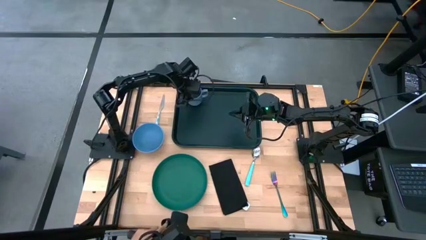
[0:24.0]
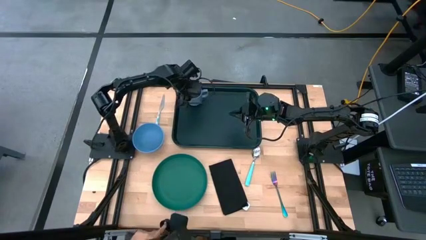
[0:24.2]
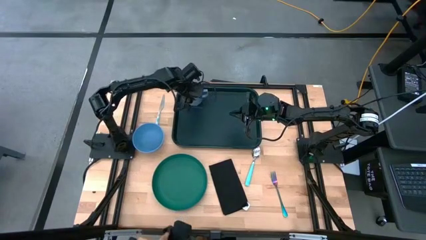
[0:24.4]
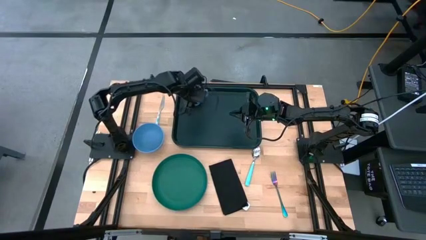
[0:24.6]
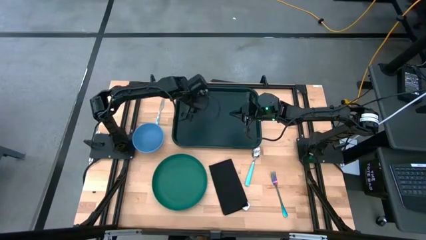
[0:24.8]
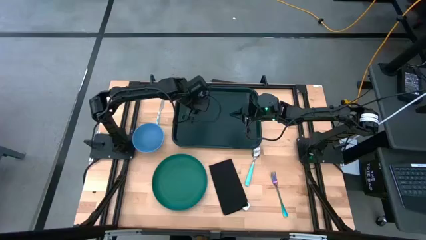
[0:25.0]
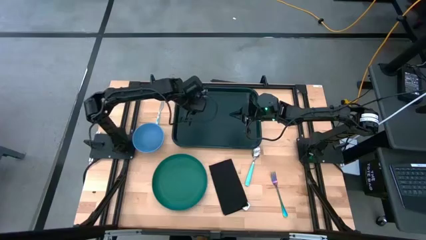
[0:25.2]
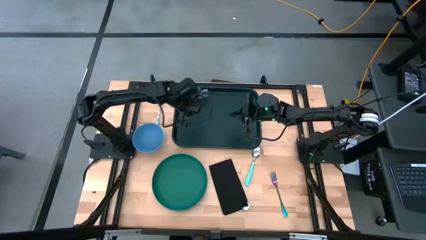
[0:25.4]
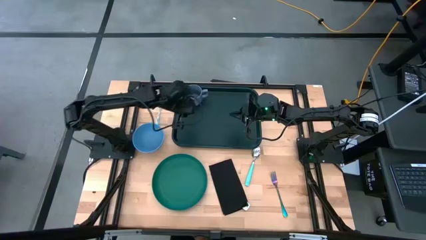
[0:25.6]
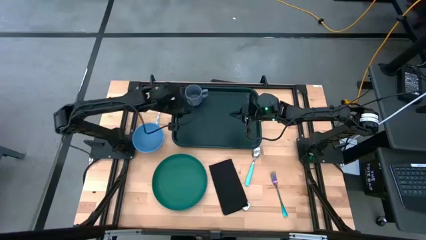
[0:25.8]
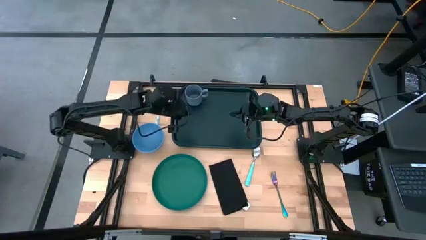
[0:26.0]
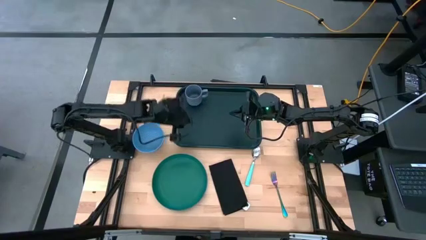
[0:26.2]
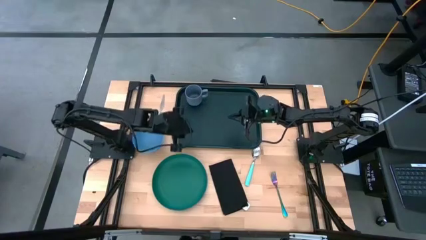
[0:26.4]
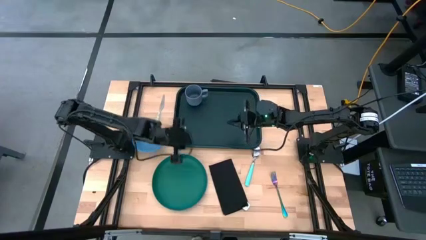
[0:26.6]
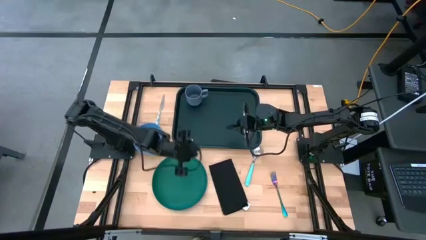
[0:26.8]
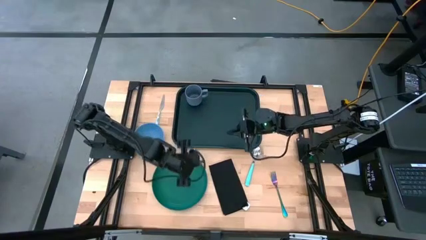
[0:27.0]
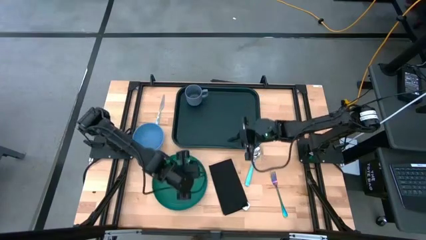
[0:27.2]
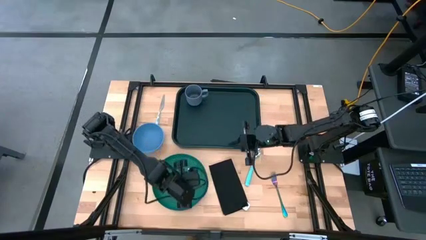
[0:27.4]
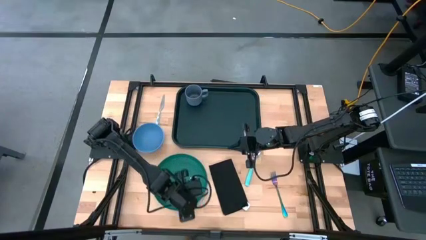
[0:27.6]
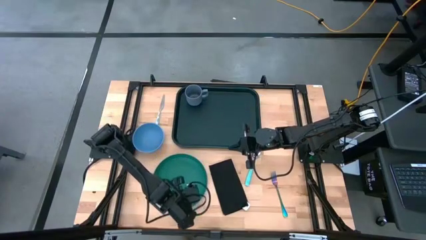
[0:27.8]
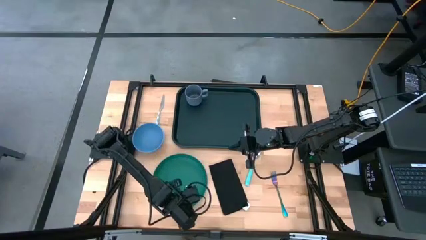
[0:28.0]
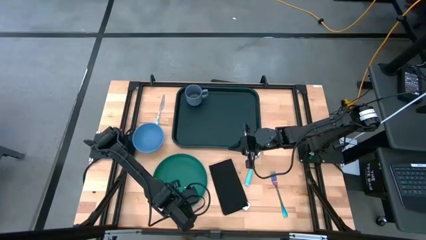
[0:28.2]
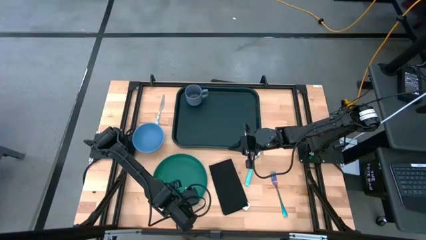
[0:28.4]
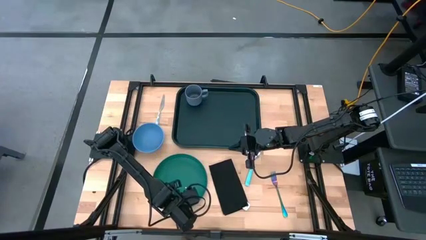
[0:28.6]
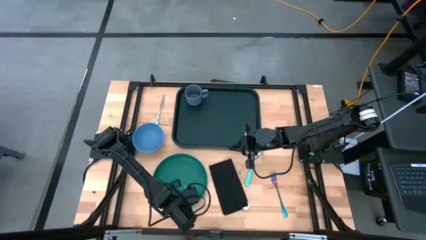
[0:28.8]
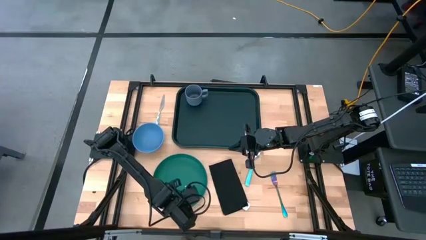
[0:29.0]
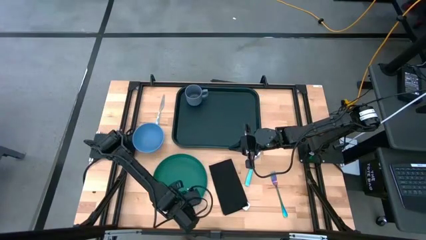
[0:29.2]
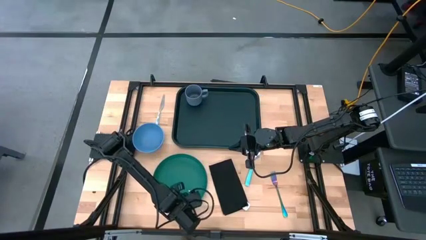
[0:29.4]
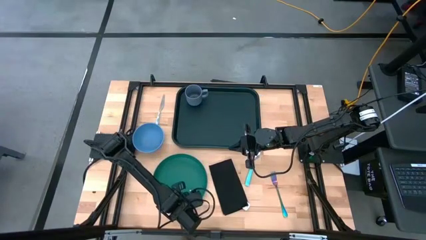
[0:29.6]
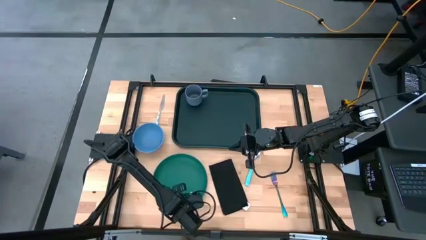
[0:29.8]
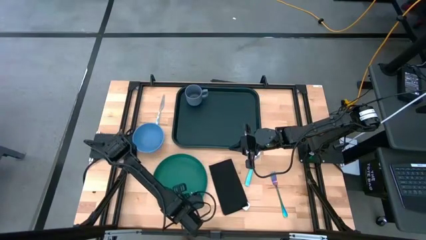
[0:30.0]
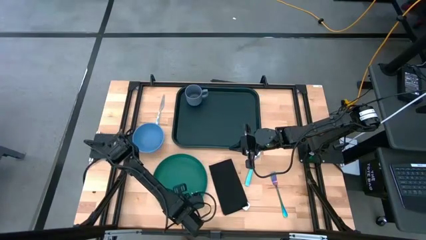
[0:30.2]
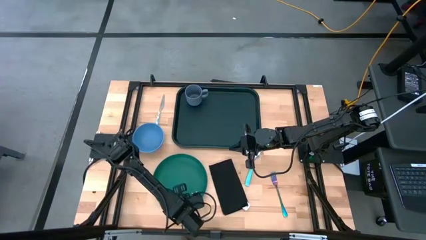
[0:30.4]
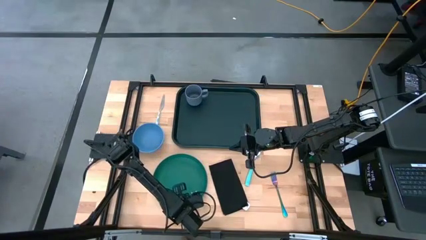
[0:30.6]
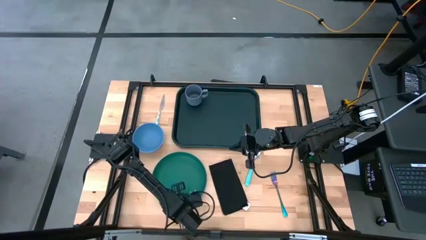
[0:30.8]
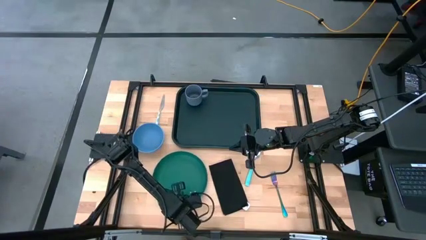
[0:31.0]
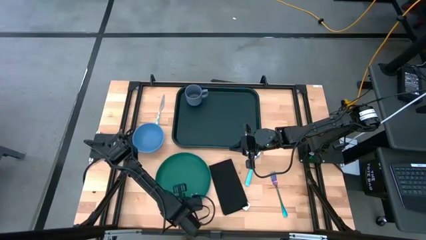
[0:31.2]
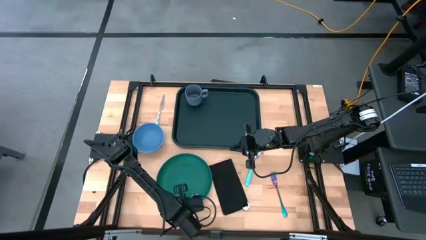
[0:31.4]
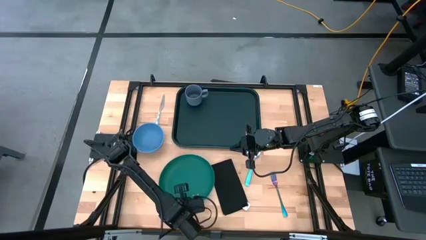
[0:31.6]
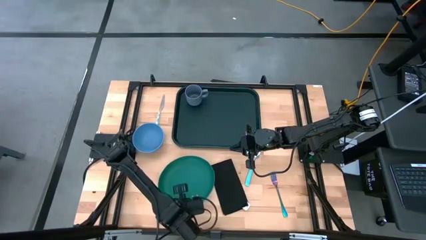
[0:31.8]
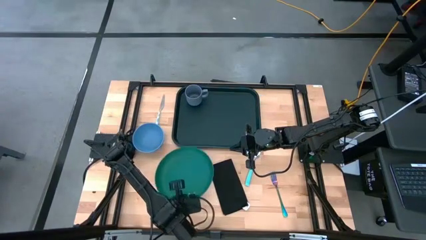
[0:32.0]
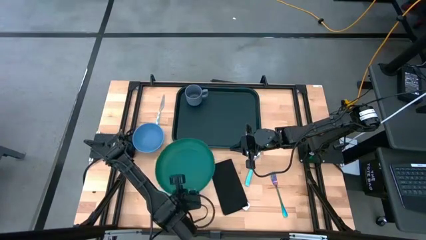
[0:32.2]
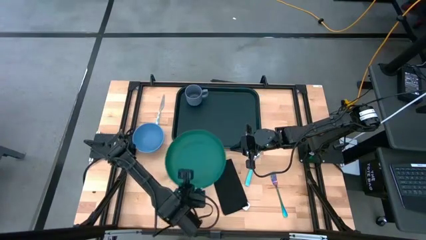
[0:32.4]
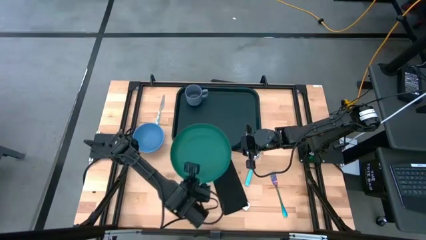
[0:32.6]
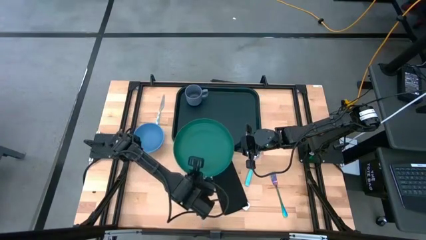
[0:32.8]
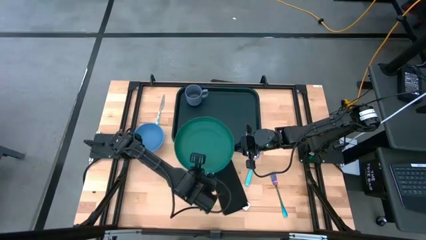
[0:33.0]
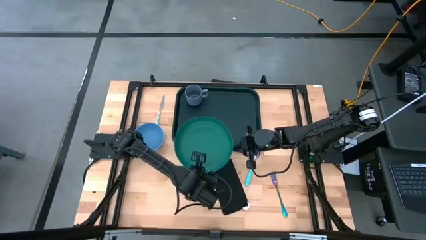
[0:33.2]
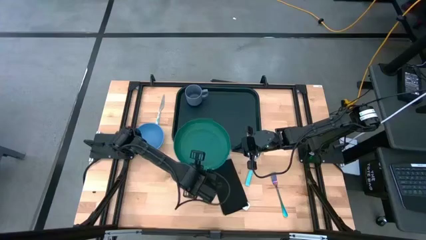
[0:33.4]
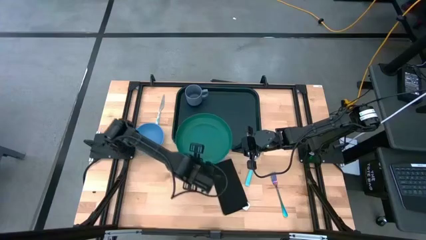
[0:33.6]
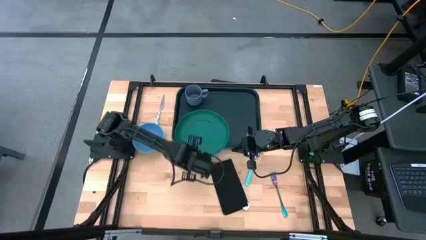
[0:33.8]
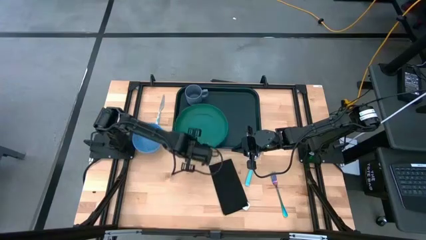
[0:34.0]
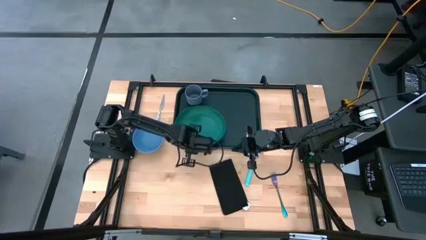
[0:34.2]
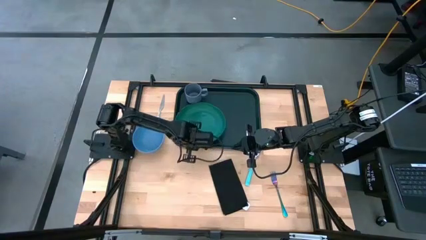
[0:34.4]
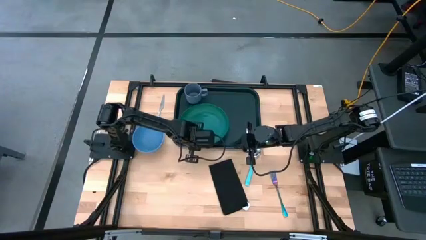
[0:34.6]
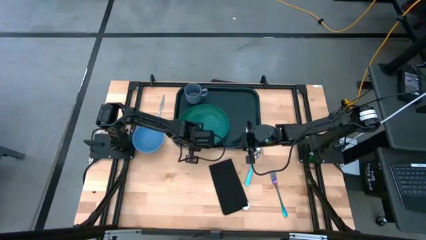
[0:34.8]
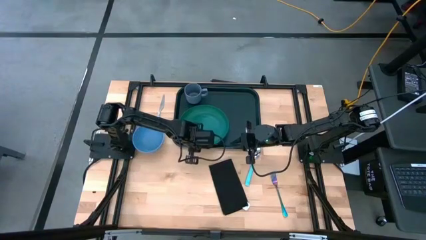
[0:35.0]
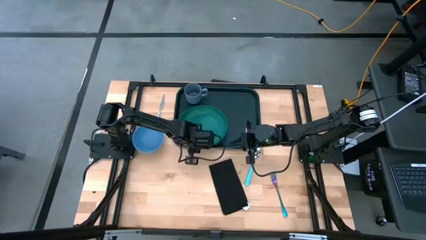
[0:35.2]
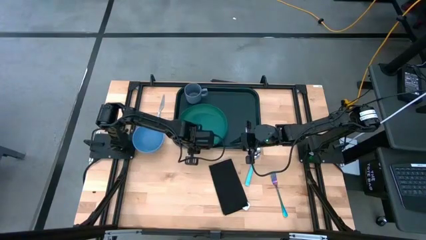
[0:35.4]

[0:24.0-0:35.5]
Task: Set up tray
Put the green plate to the bottom of the gray cup on the black tray

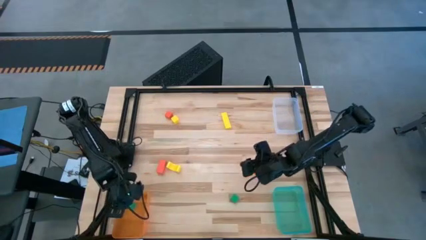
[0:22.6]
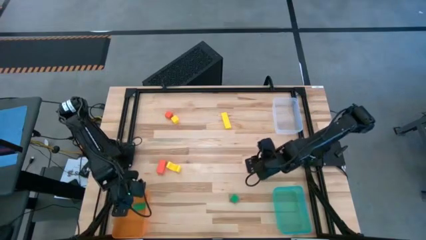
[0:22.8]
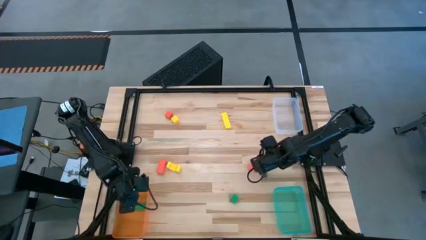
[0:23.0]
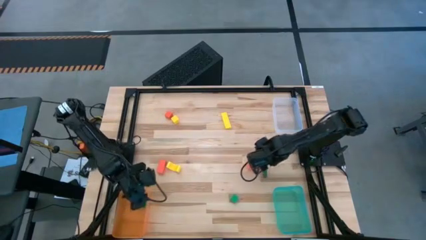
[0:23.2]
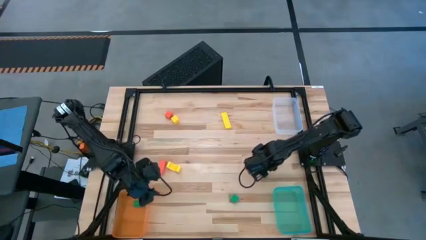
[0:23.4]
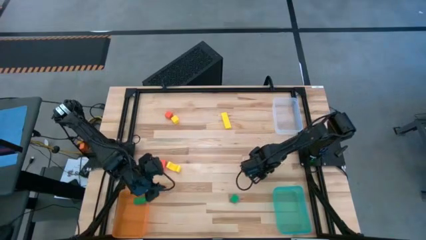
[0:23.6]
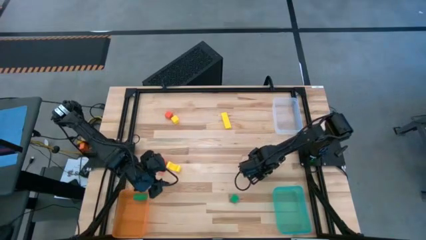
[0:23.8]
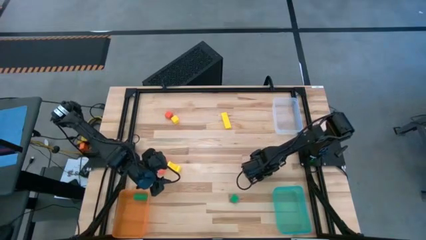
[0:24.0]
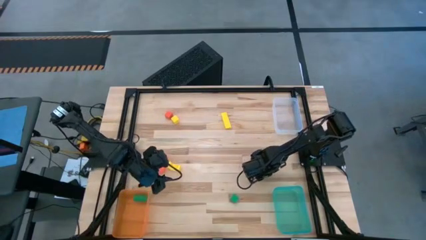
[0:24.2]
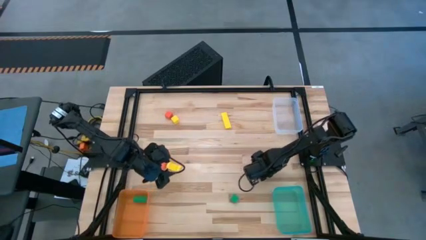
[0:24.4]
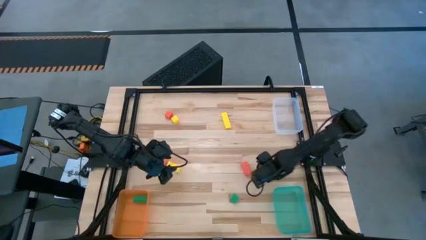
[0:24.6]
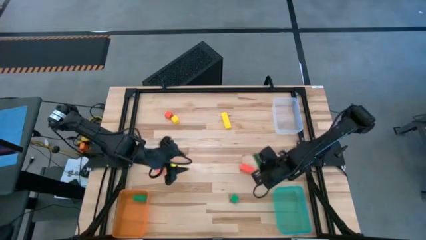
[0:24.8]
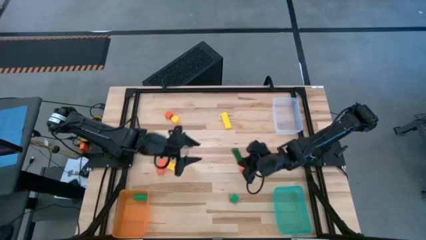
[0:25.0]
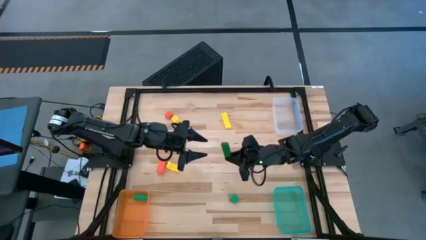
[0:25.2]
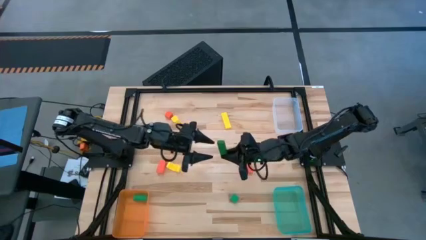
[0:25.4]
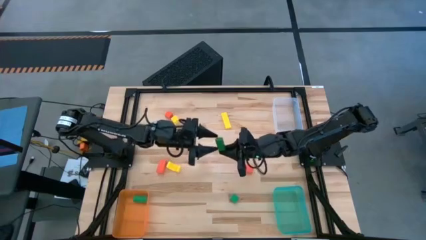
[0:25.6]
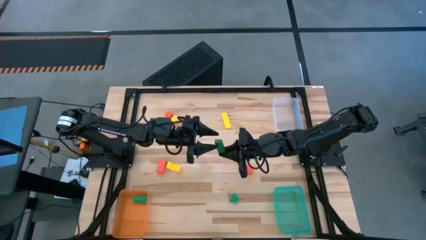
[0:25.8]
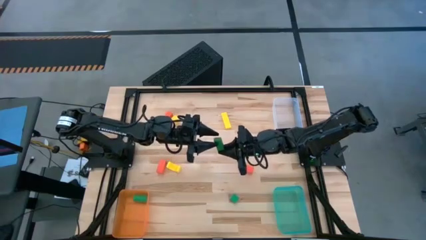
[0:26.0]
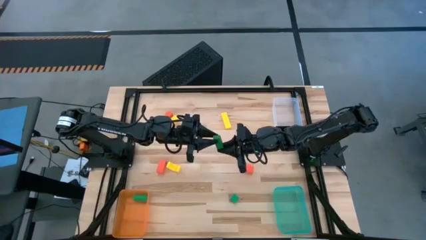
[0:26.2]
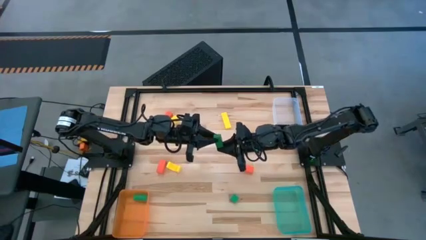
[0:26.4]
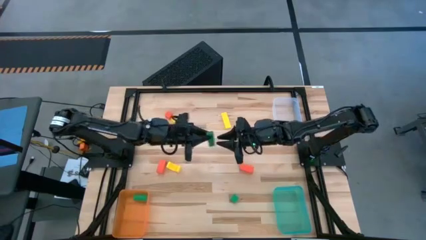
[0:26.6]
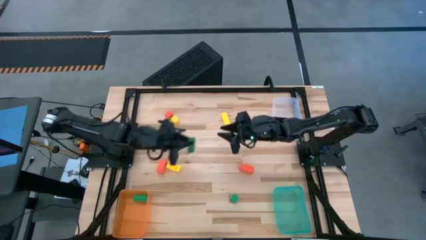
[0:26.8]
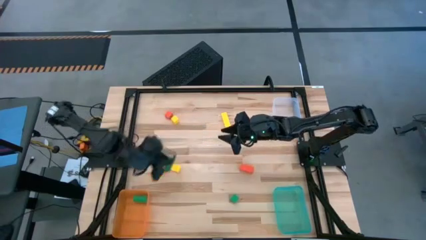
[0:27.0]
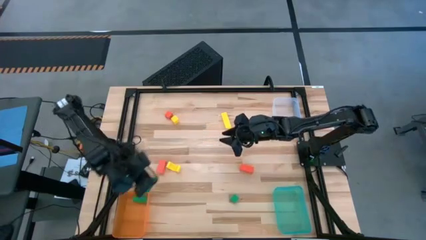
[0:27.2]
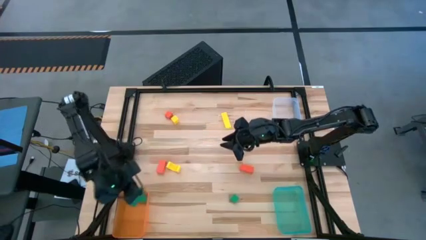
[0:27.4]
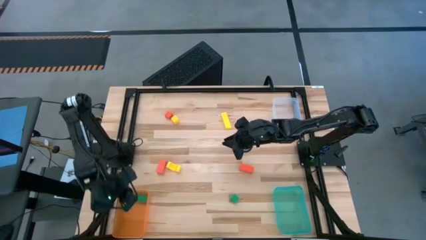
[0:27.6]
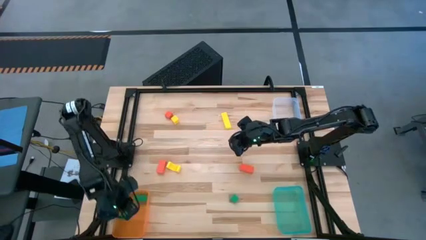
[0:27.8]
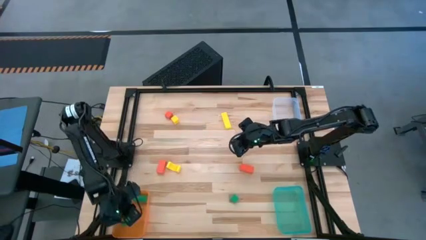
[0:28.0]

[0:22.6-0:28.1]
Task: Sort & place blocks by color
Put the top green block into the orange bin
